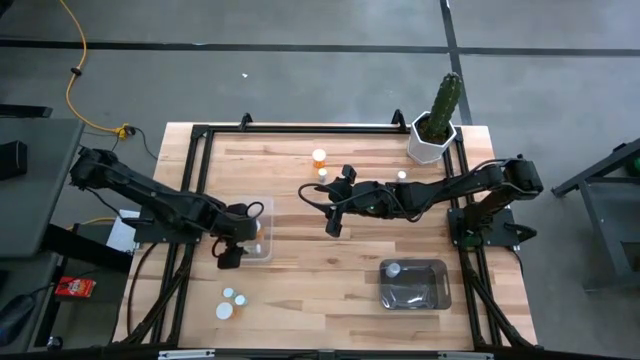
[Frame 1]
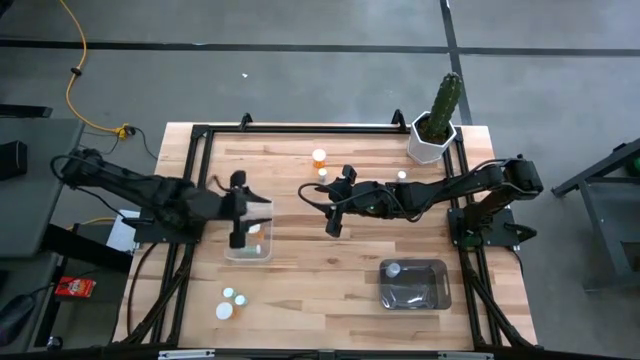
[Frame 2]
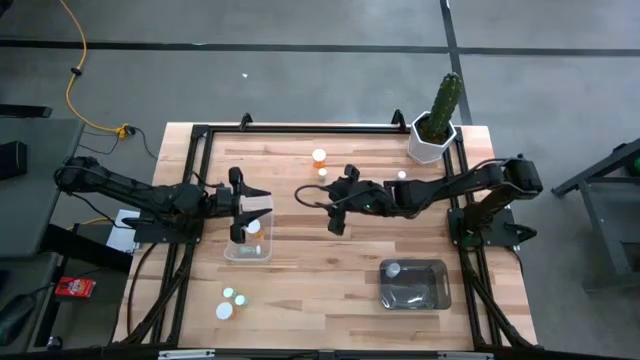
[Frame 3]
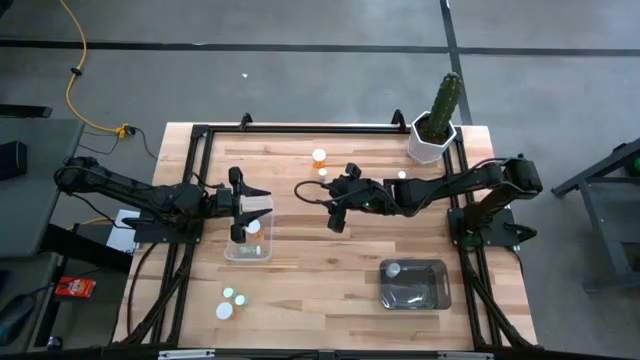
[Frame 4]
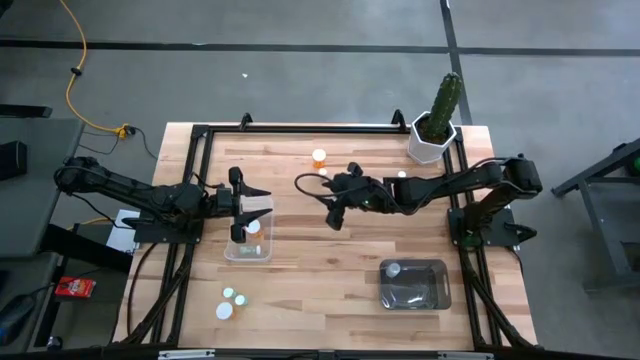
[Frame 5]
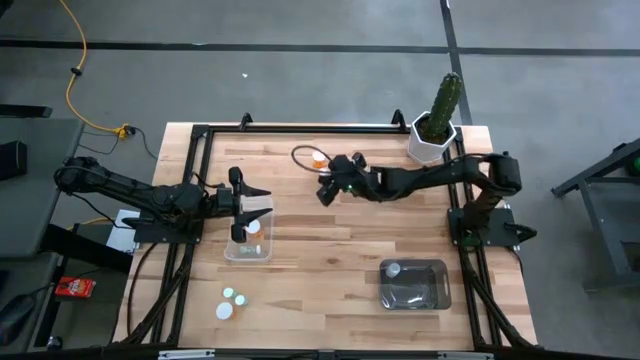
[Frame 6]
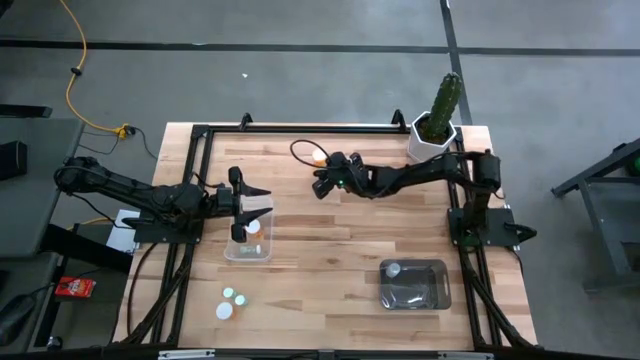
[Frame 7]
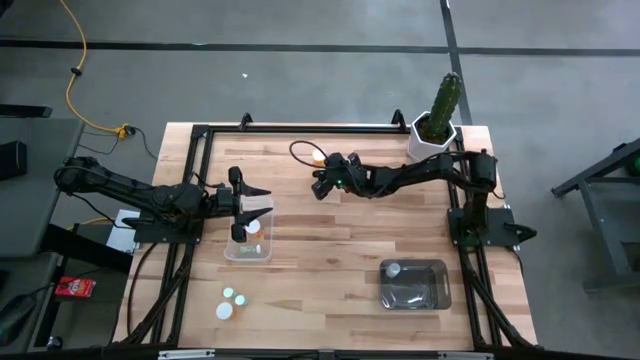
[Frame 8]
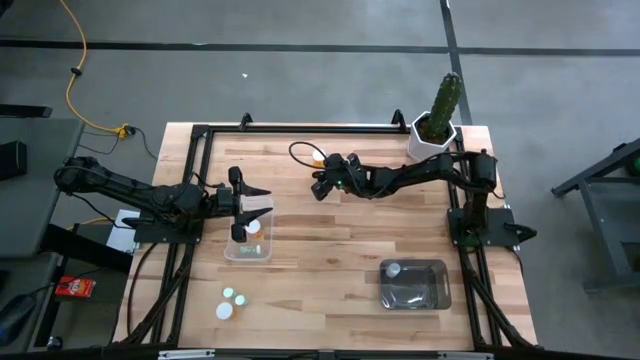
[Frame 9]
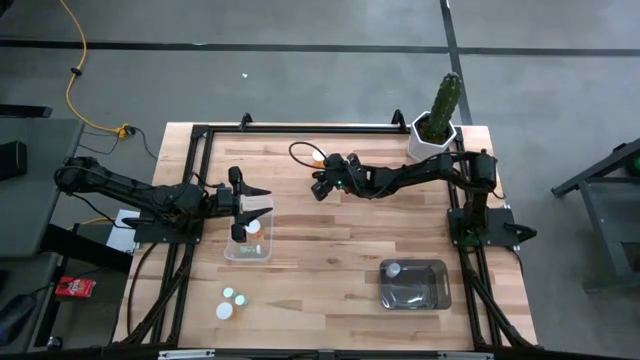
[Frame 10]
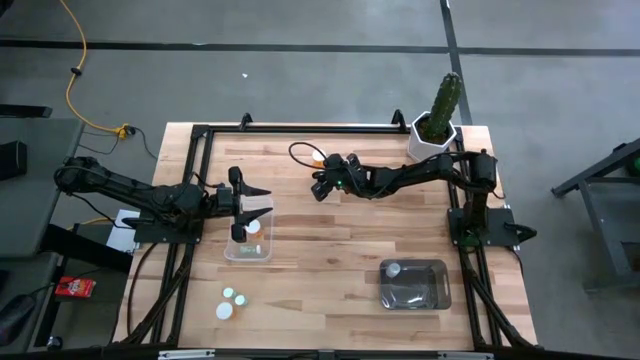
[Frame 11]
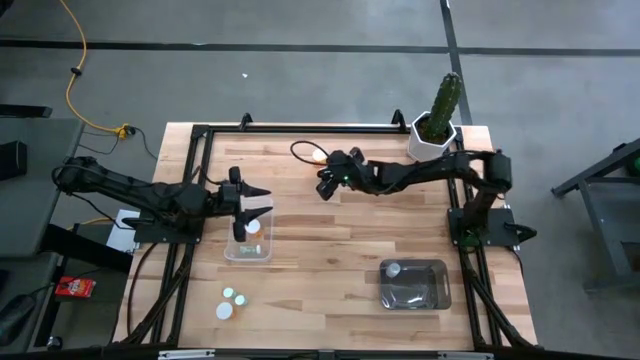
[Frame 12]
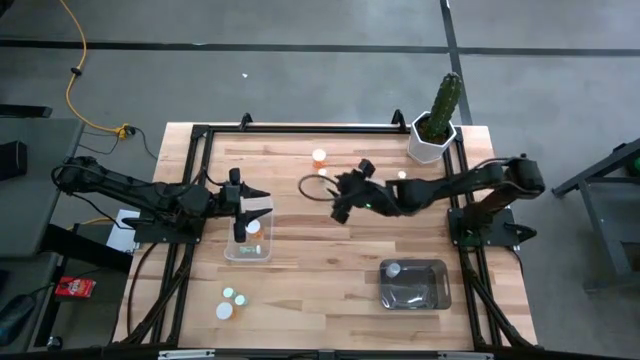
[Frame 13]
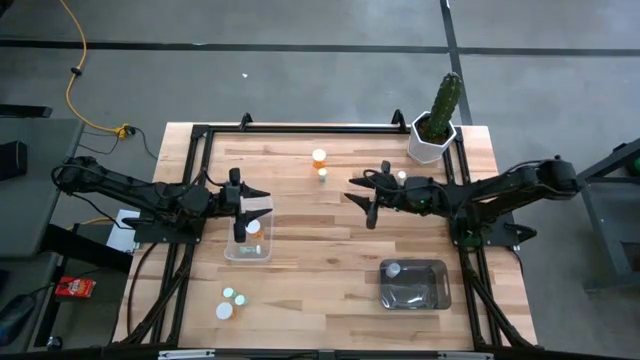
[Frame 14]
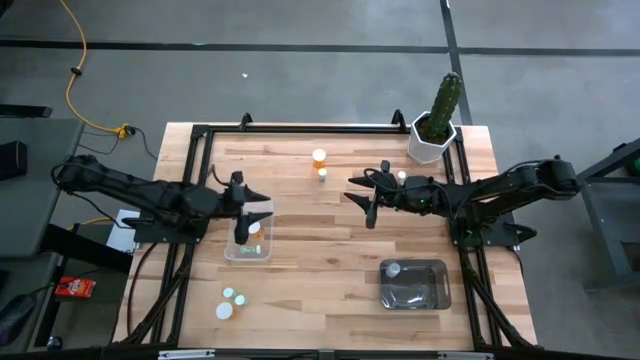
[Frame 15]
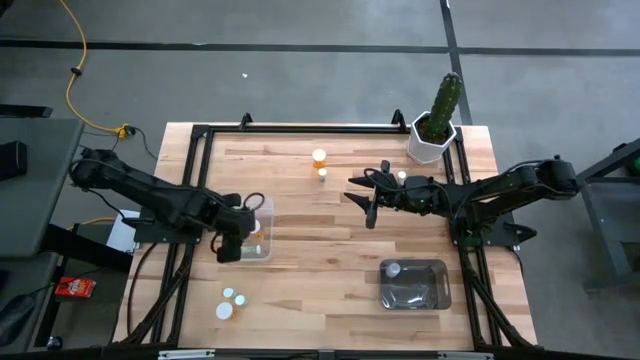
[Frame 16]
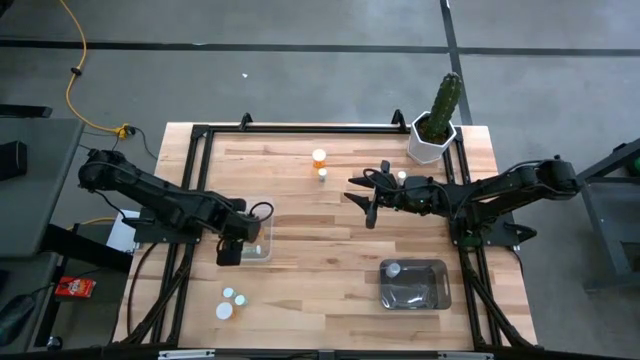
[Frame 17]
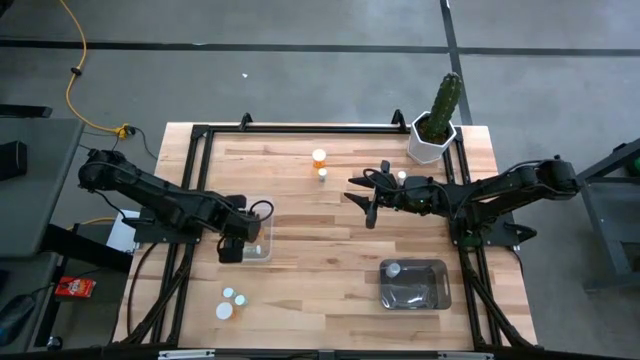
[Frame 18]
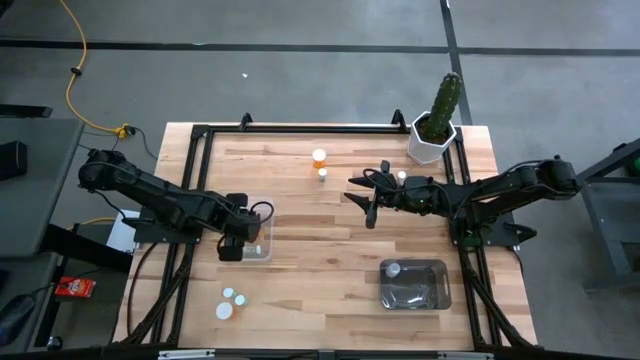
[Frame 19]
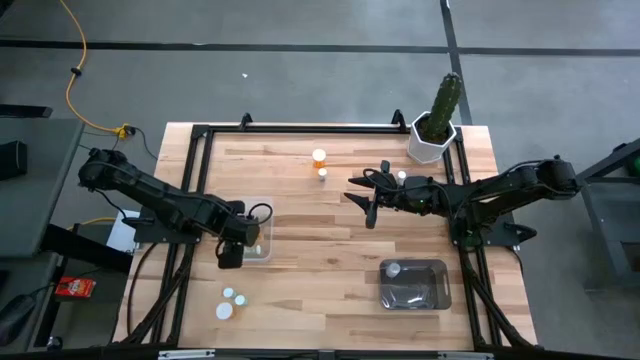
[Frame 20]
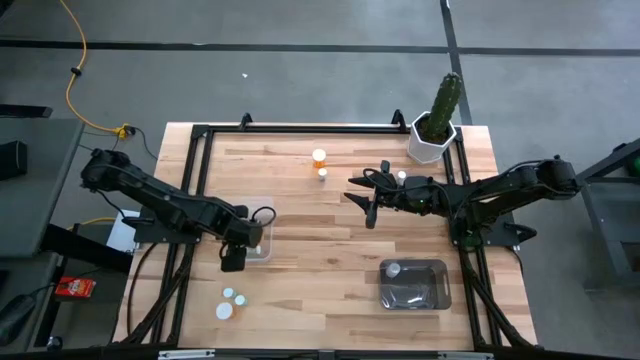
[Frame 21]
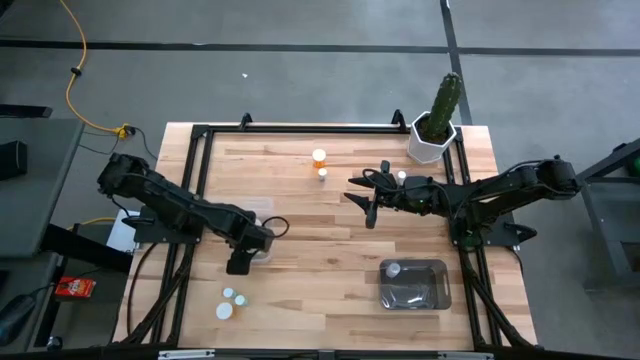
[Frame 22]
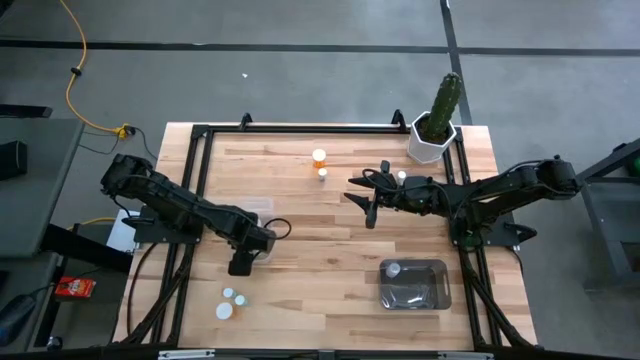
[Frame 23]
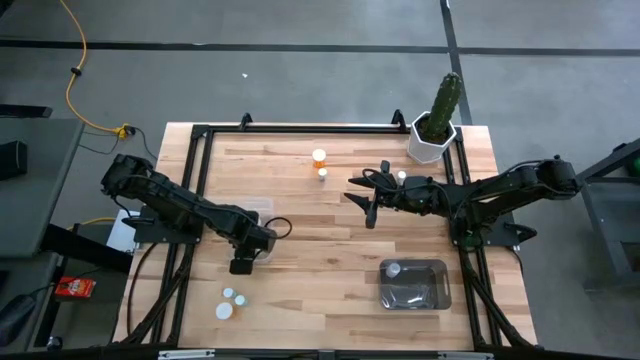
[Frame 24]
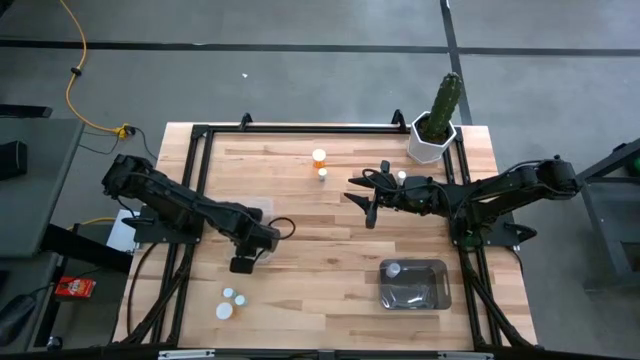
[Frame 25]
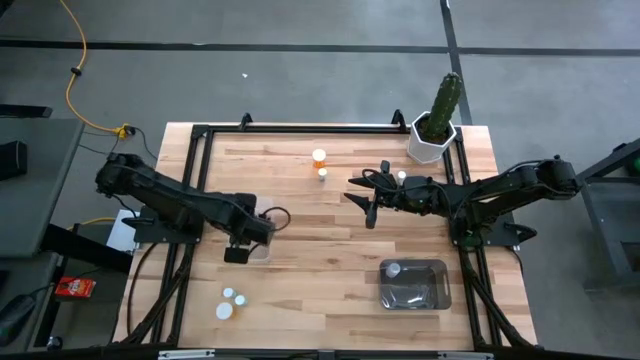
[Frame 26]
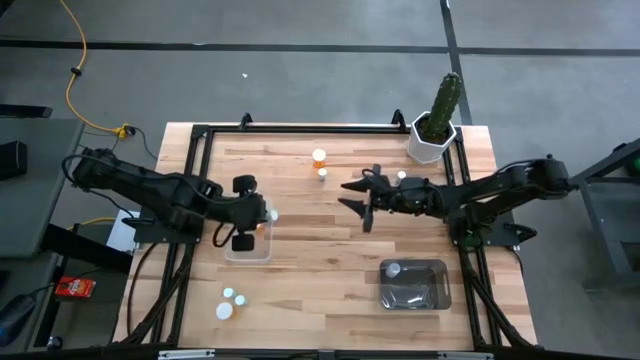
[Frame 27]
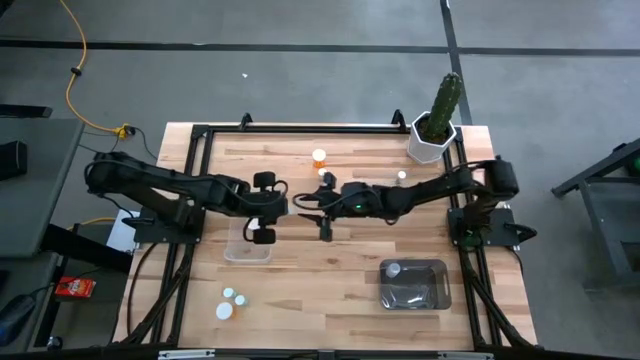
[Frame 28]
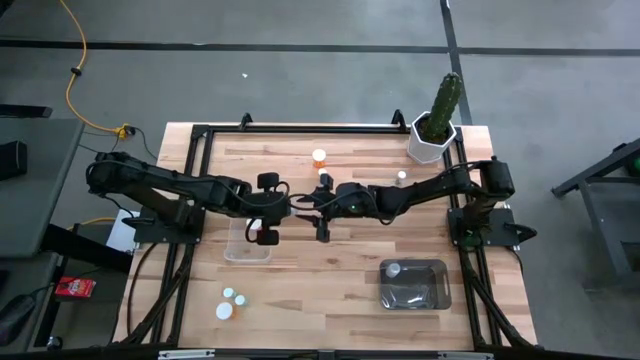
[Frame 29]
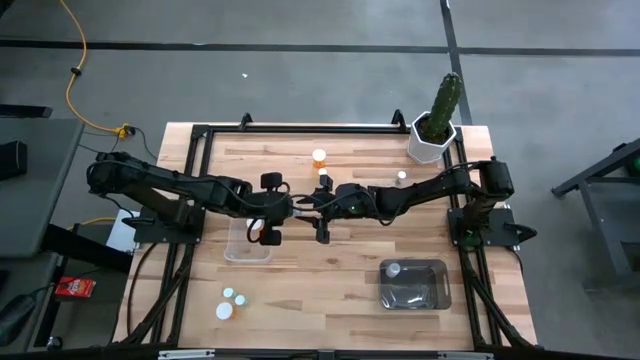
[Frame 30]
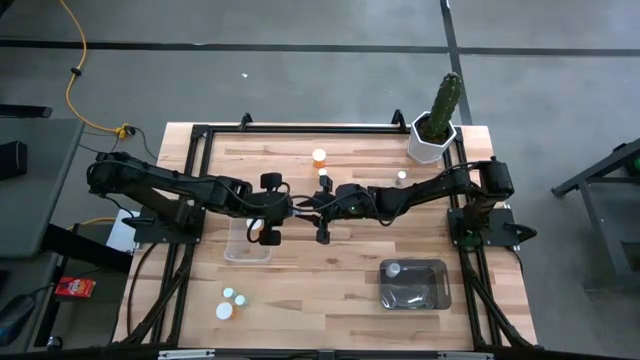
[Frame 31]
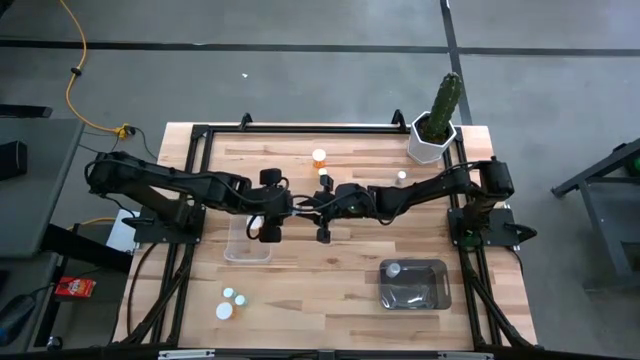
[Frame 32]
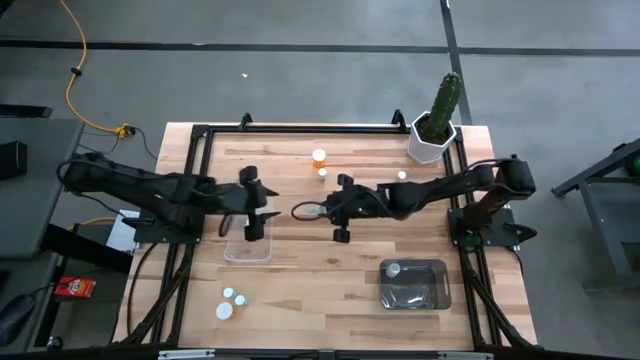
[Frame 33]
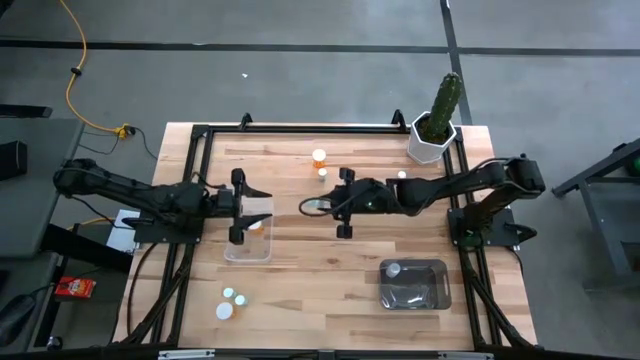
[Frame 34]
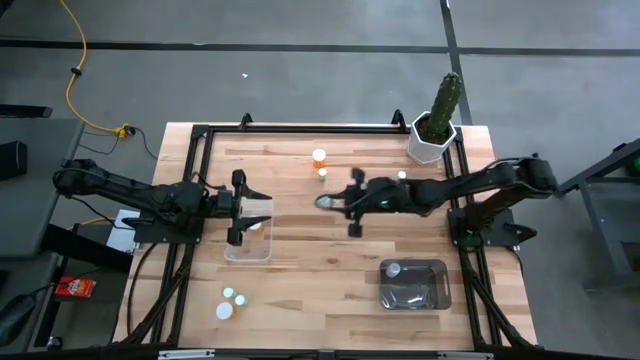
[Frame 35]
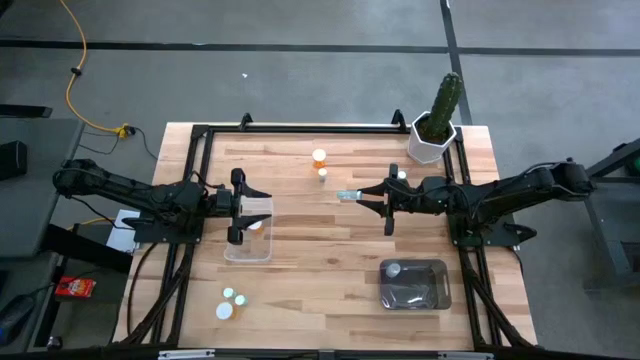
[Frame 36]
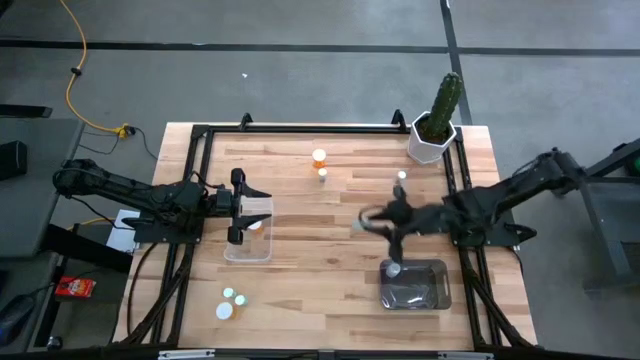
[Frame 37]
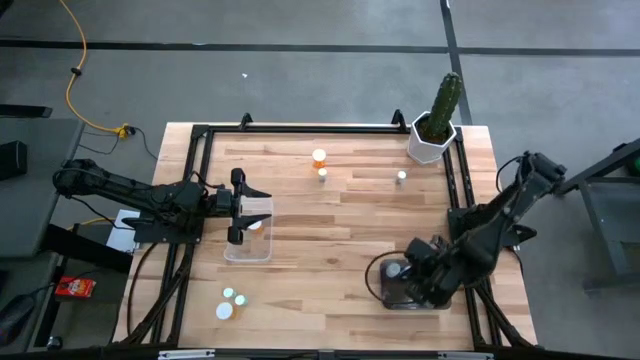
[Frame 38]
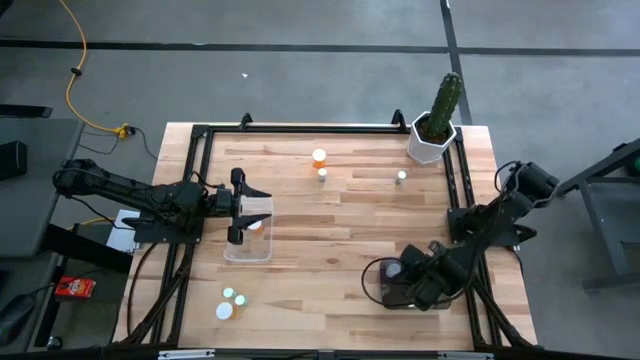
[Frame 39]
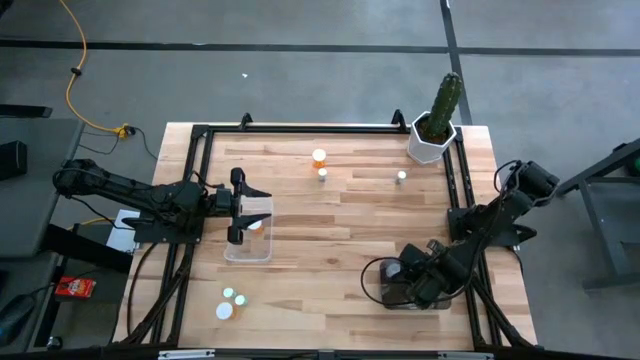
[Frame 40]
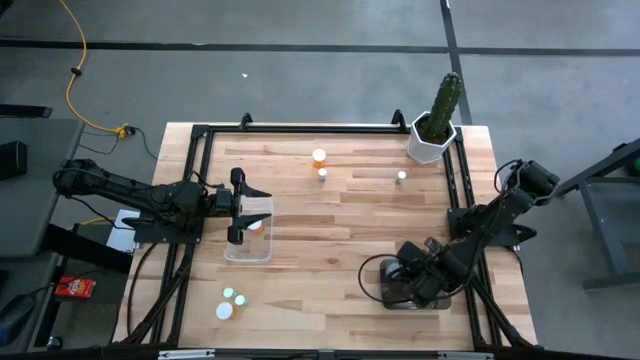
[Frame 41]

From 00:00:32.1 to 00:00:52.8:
Task: Pick and place medicine bottles into bin by pill shape (circle, oval)
Put the top right blue tablet bottle into the black bin
